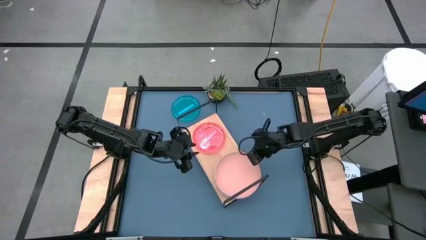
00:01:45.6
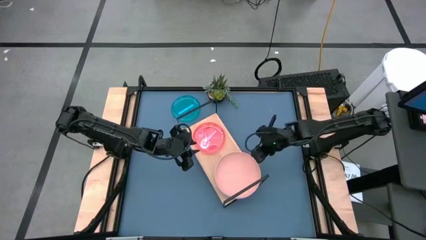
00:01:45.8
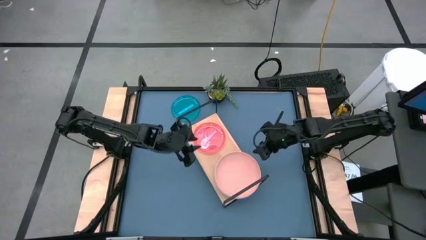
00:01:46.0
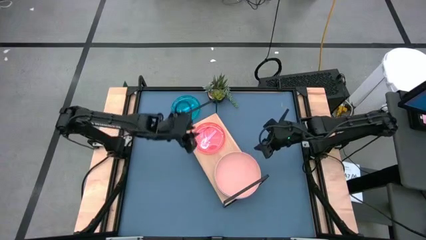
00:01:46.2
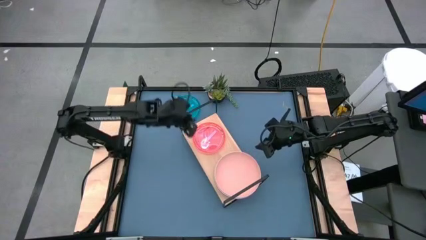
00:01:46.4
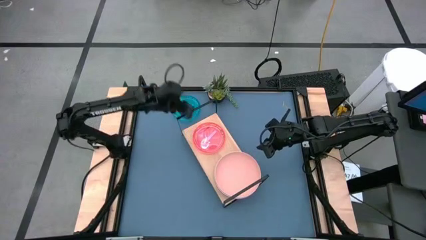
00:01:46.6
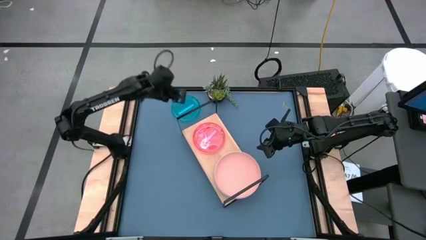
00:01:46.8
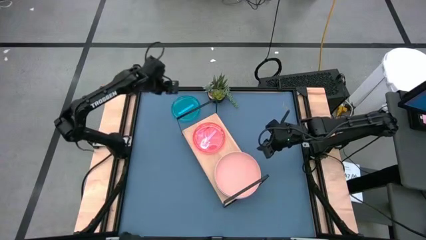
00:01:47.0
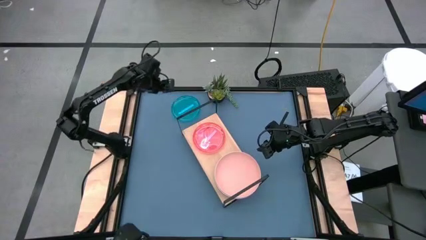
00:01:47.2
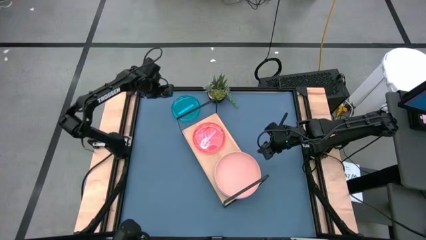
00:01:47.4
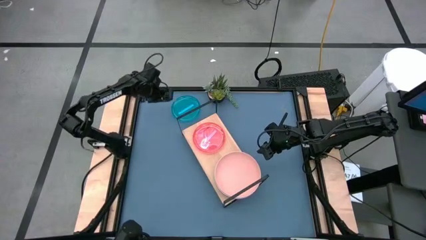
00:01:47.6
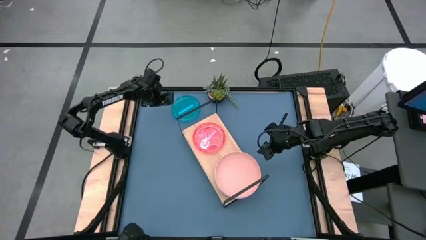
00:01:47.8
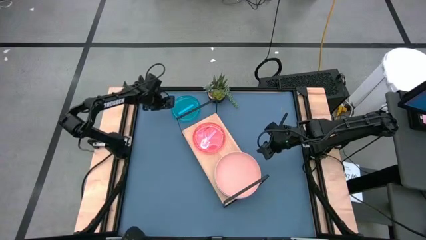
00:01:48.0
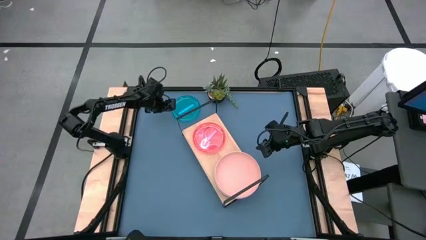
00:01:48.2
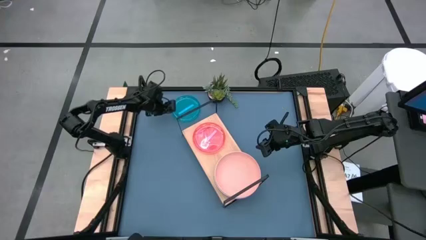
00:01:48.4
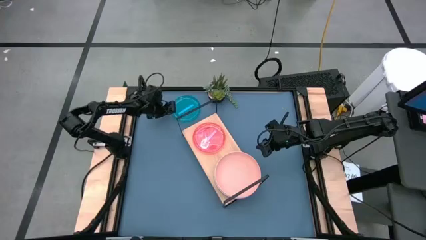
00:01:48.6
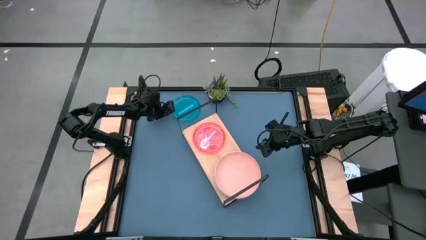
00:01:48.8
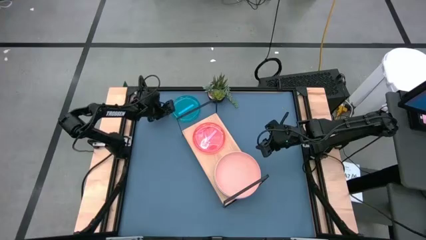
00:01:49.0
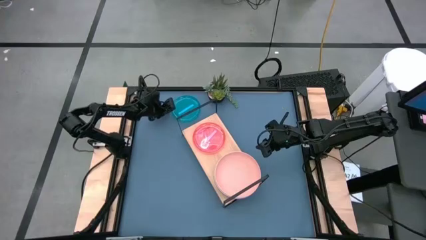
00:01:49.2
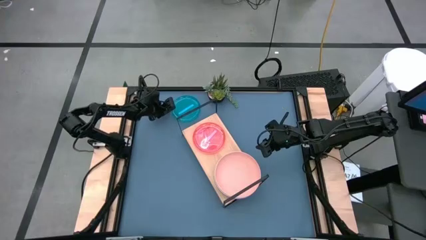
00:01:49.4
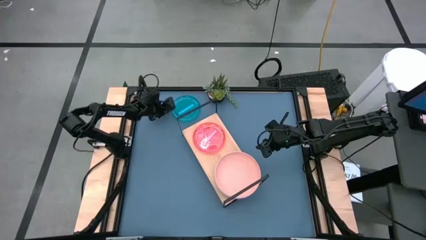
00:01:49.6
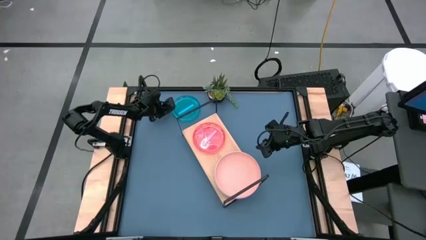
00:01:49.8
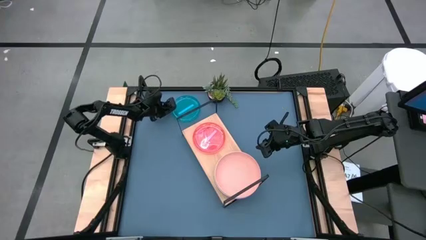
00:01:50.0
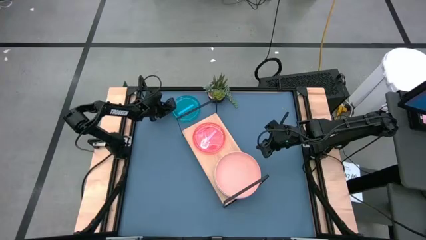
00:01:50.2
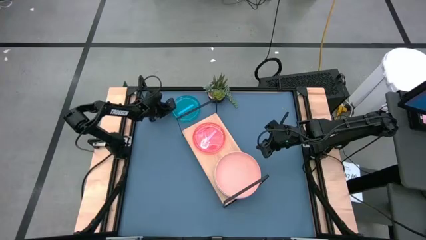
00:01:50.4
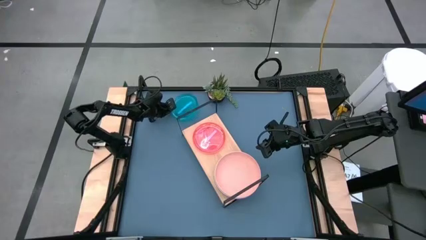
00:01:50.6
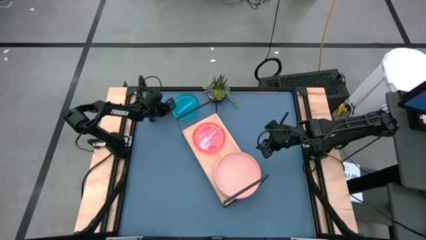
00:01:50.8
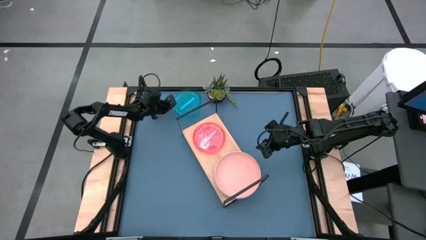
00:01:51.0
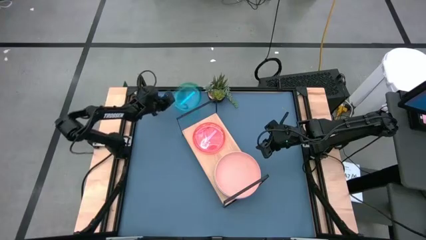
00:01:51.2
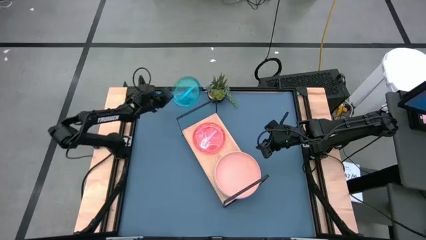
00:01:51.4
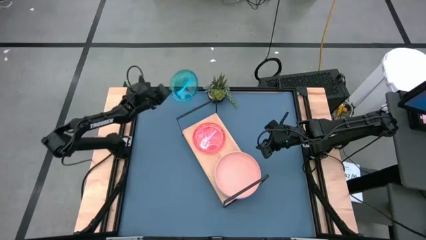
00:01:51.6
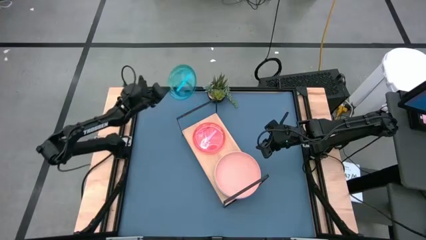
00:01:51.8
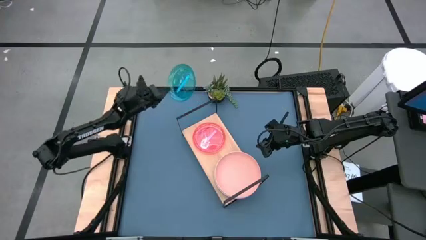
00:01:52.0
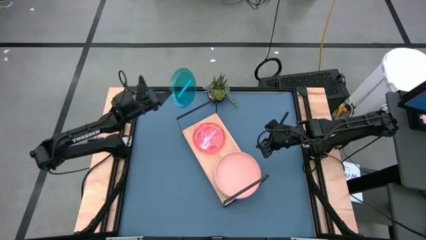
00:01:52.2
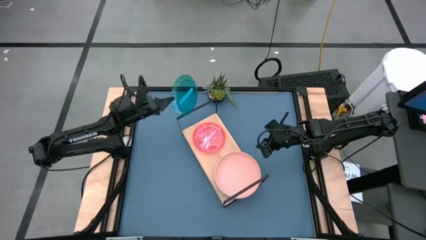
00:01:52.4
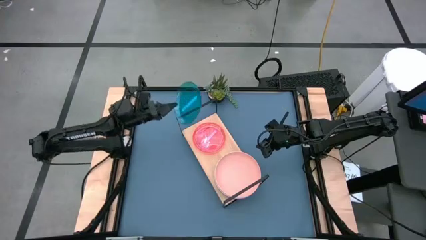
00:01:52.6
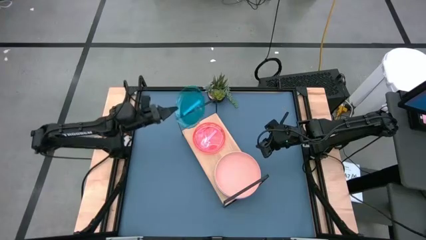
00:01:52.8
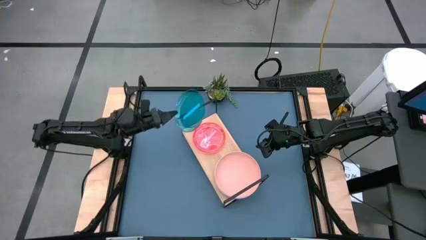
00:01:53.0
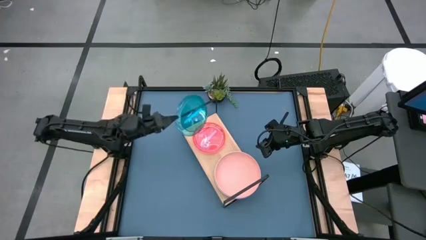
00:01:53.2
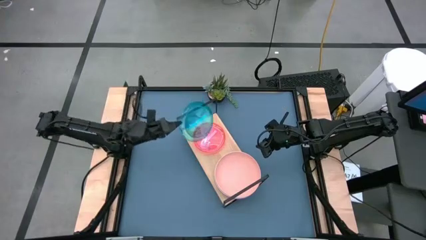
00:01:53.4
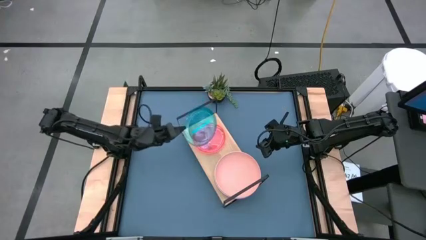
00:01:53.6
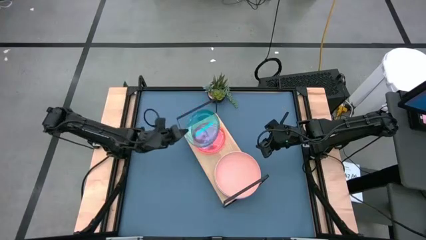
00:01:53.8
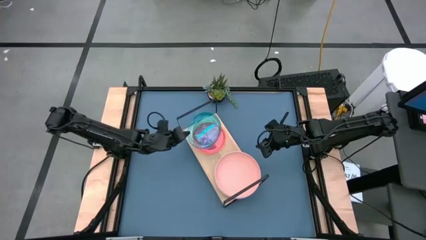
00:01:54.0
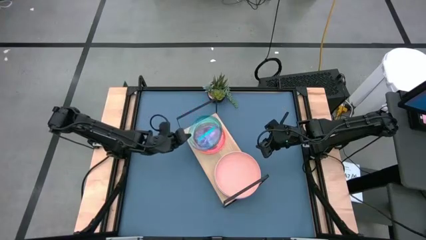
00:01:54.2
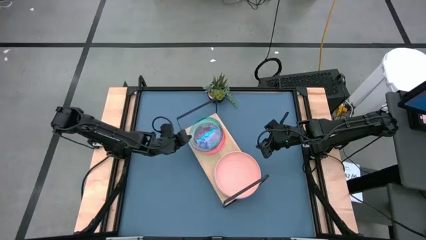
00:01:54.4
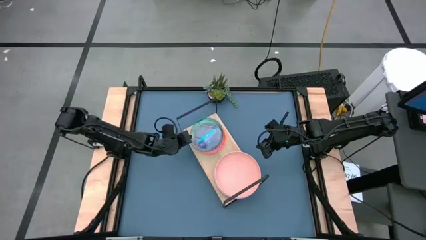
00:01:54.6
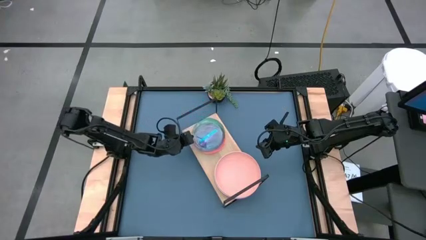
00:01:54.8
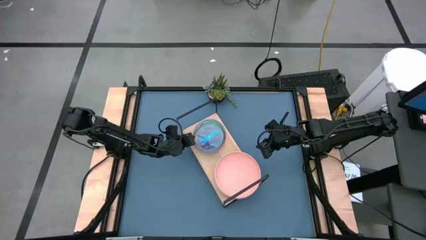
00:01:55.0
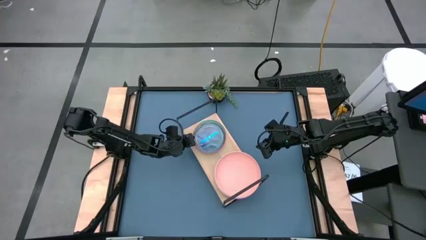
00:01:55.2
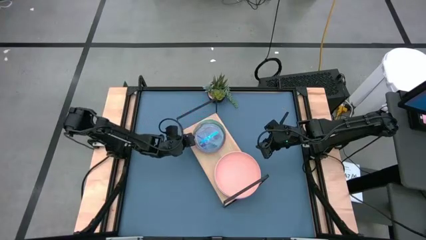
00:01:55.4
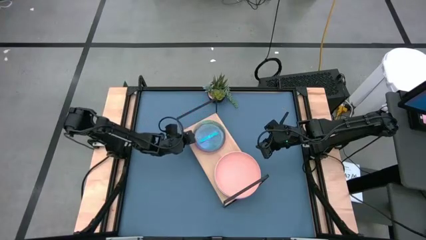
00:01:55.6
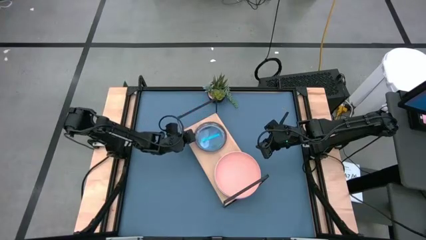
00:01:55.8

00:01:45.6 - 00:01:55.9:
Task: Place and stack plates onto a shelf
Stack the small blue plate on the small pink plate on the shelf

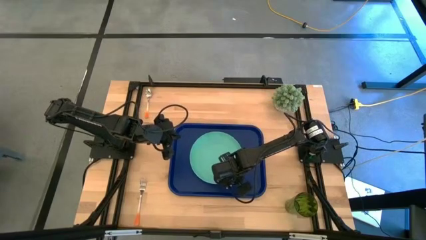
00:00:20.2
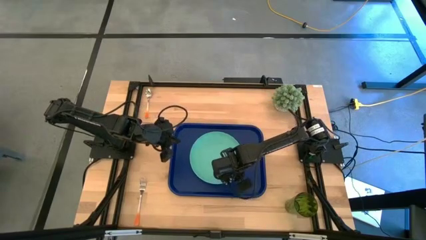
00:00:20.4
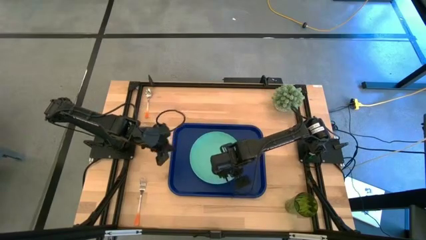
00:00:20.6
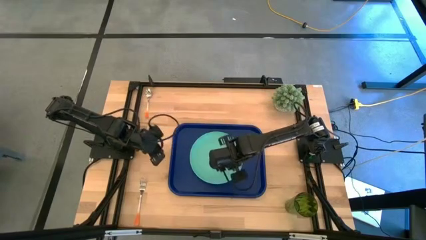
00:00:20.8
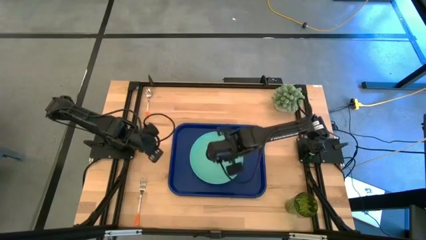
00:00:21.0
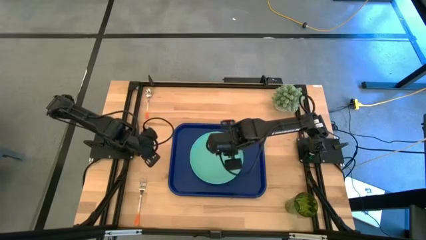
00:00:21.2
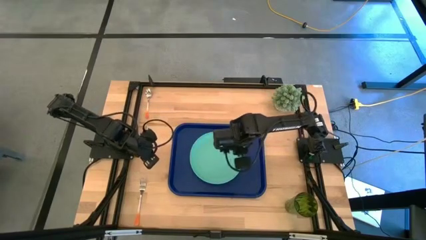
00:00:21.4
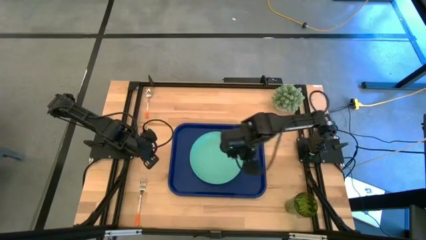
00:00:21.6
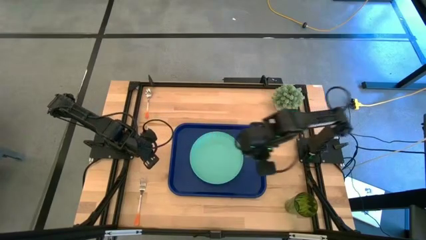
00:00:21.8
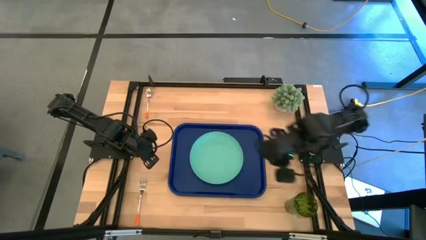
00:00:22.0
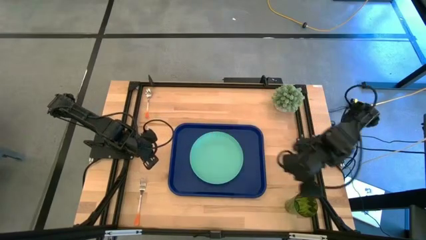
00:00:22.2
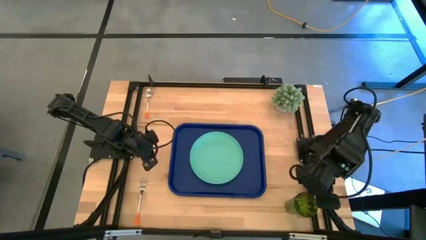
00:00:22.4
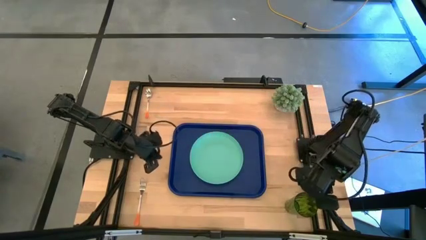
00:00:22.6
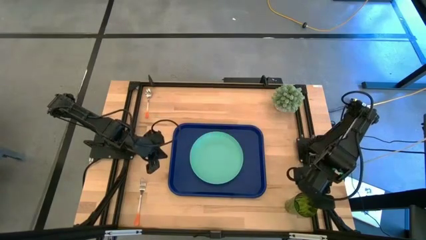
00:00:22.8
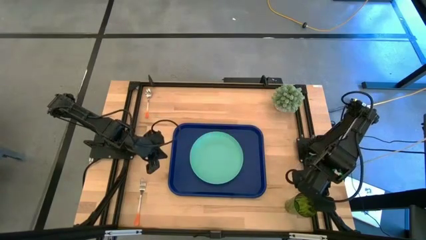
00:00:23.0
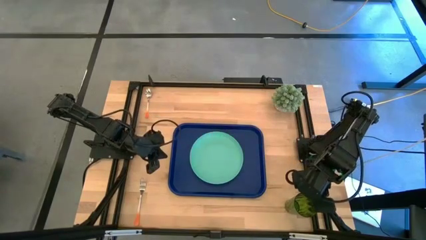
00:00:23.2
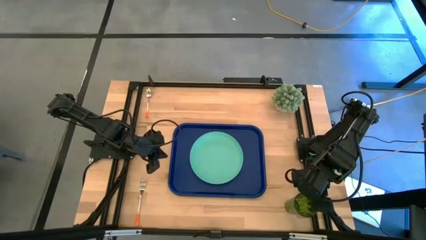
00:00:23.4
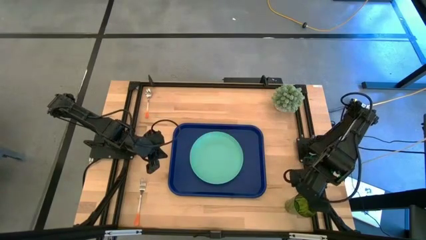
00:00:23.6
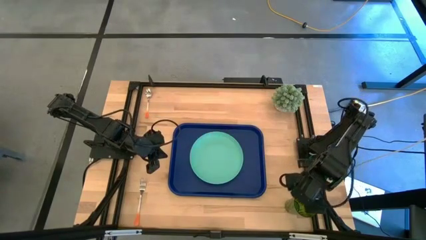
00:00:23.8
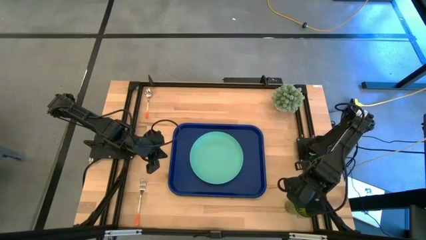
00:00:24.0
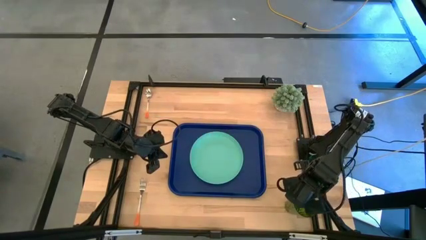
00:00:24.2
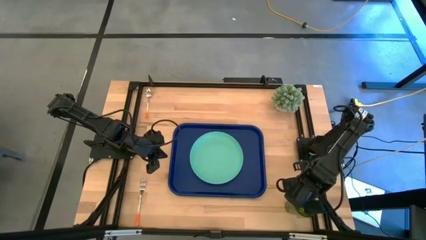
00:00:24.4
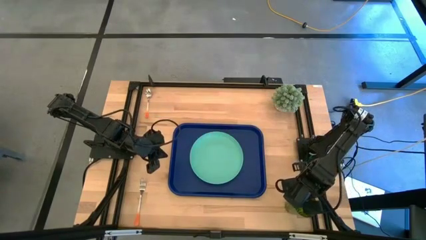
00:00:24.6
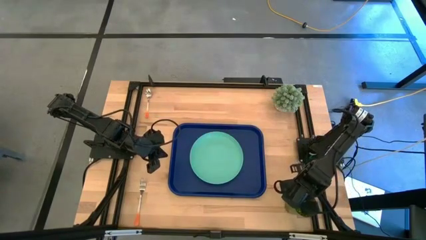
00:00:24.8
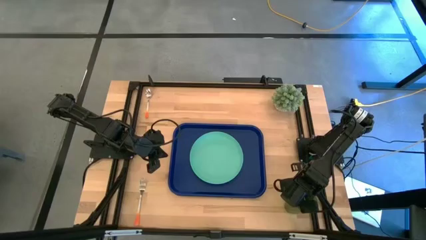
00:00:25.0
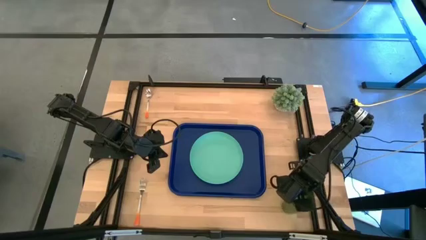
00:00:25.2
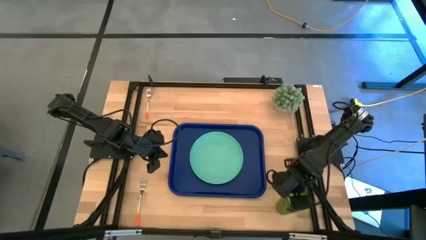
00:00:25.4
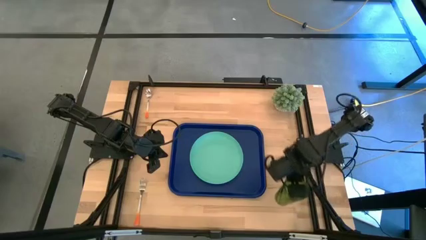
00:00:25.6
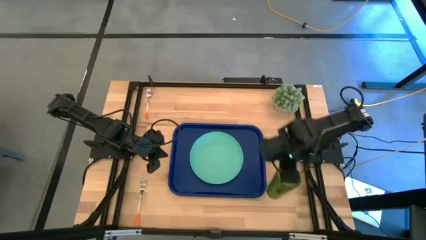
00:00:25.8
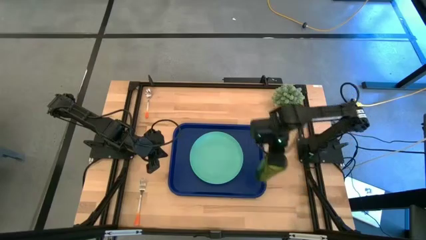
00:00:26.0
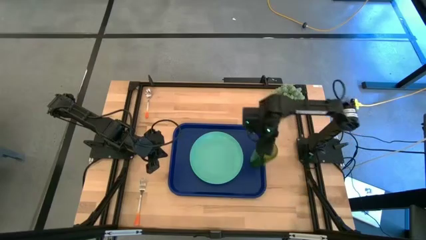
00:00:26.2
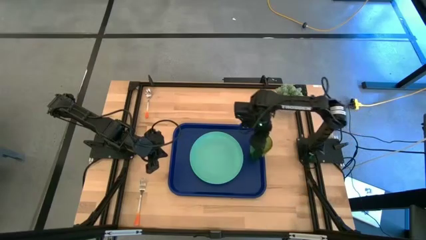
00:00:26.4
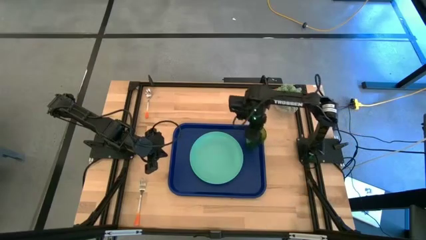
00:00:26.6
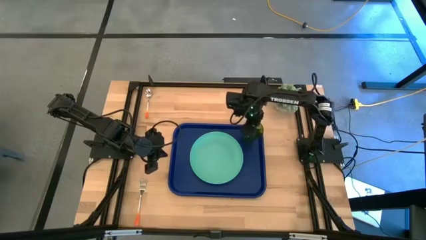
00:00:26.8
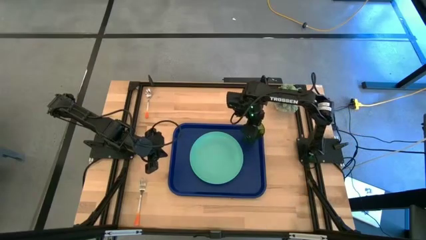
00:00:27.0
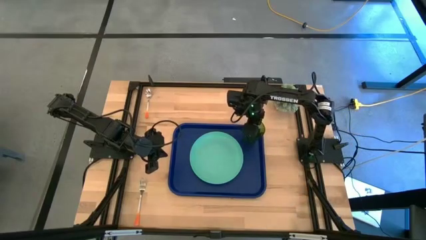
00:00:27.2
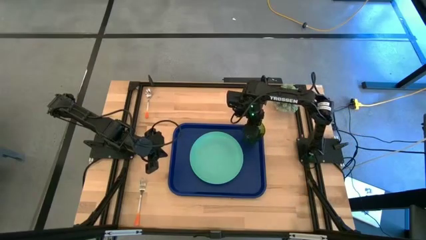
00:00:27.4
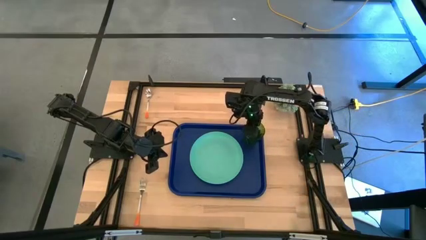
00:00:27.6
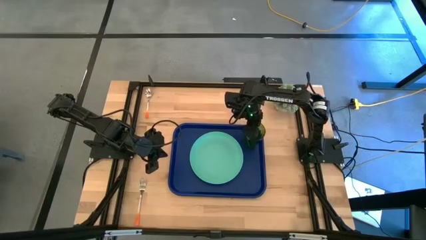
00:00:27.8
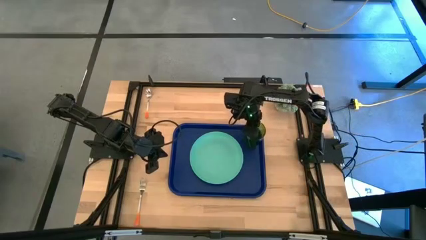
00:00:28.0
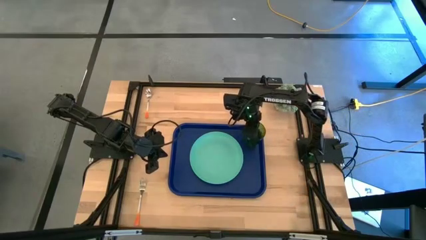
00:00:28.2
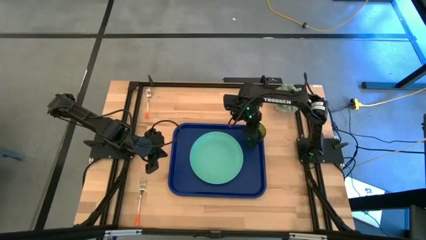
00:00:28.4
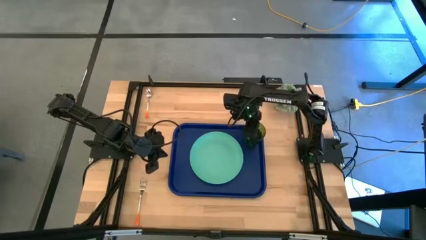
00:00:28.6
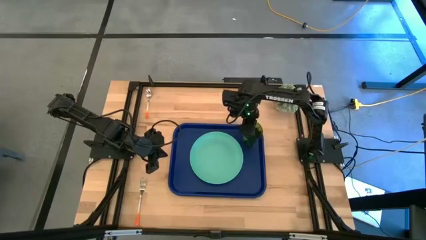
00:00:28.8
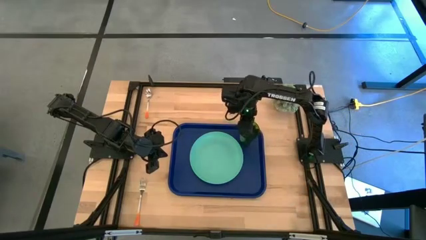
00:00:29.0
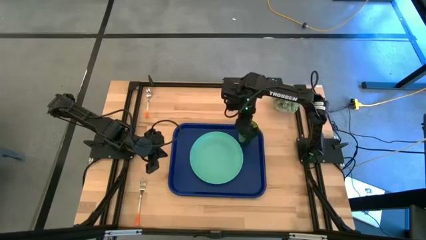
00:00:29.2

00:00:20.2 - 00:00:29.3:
Task: Pick and place plate/cup/fork/spoon on tray
Put the green cup on the right of the green plate on the blue tray
